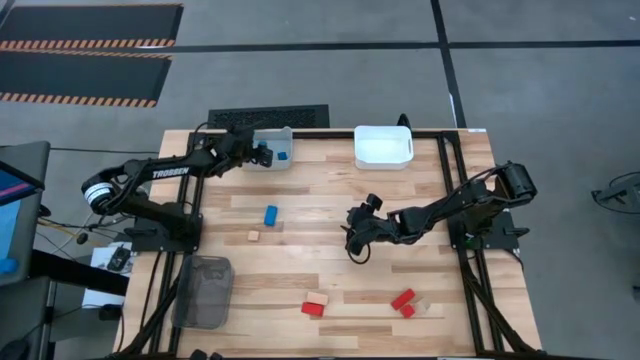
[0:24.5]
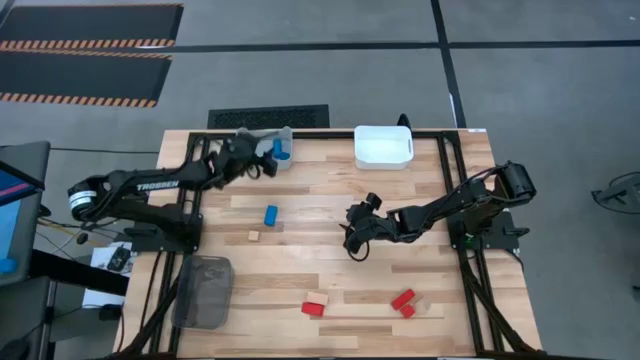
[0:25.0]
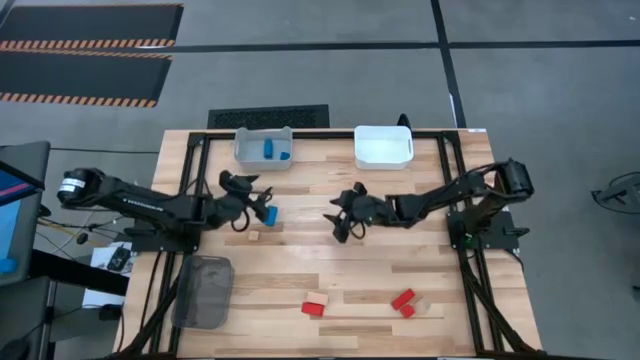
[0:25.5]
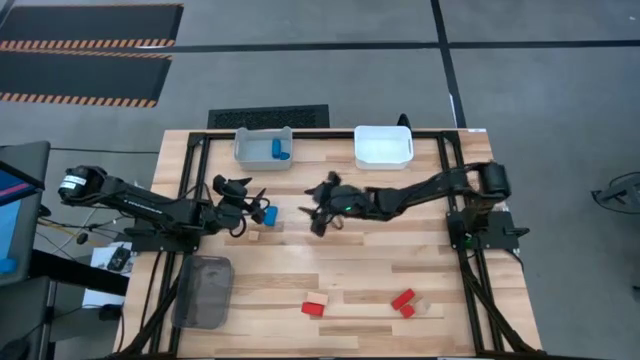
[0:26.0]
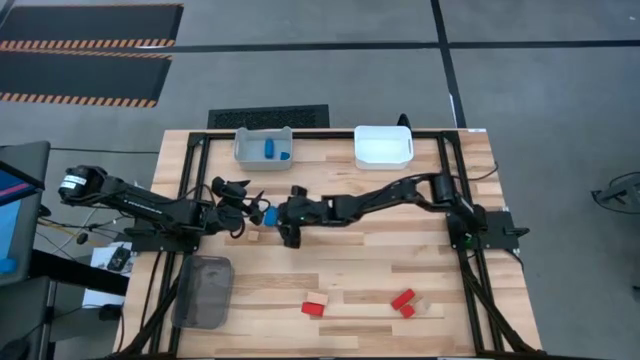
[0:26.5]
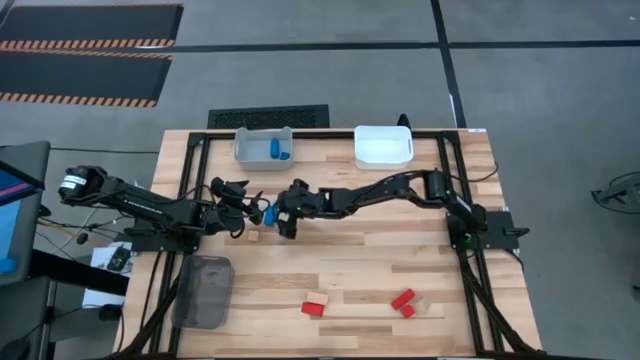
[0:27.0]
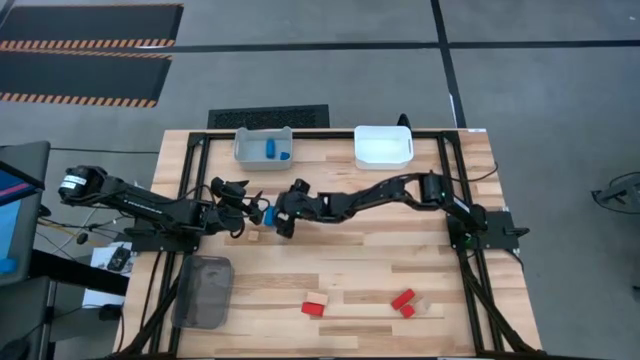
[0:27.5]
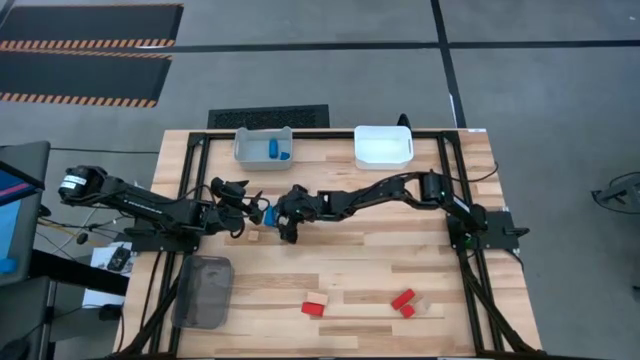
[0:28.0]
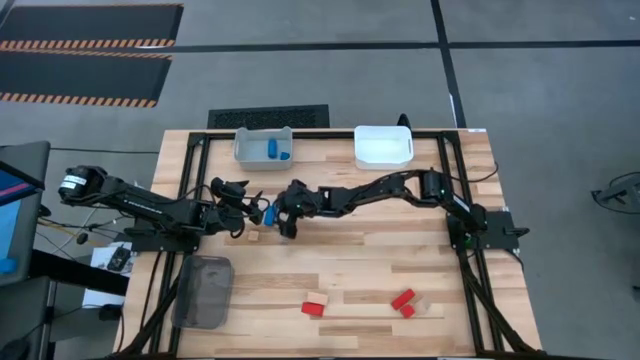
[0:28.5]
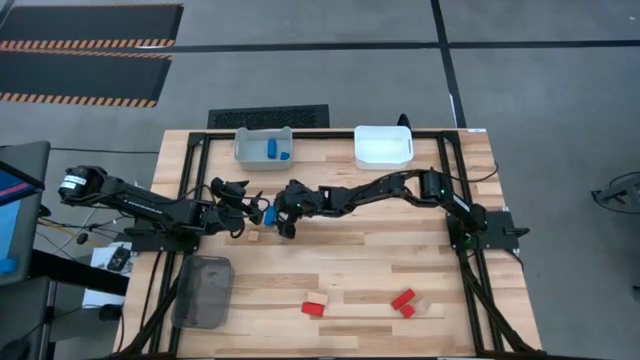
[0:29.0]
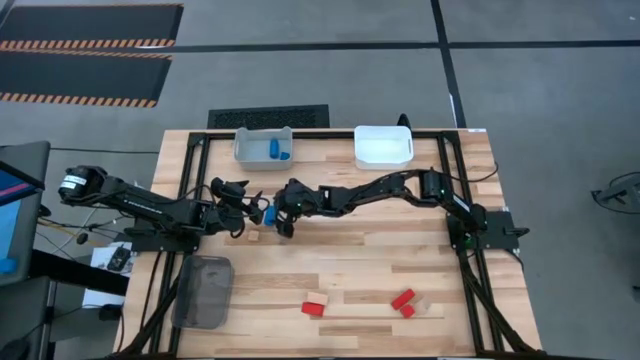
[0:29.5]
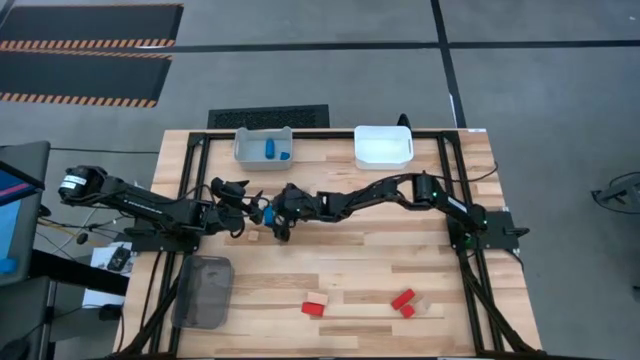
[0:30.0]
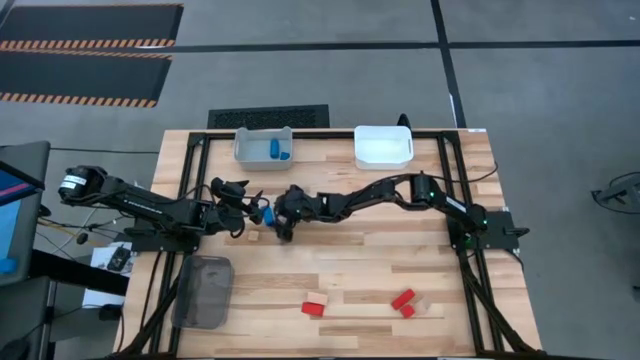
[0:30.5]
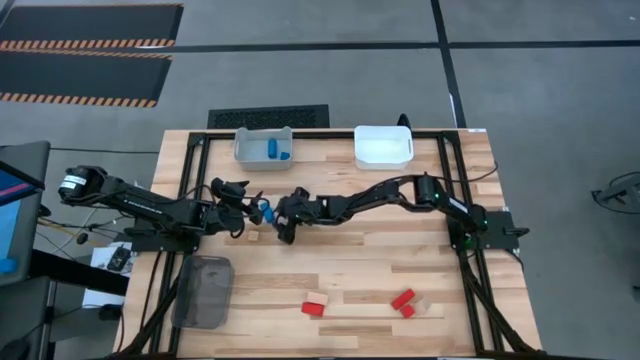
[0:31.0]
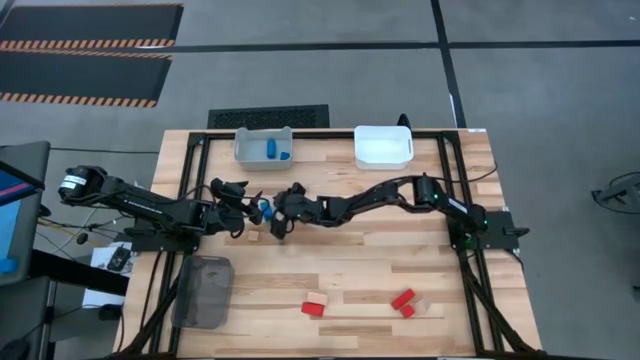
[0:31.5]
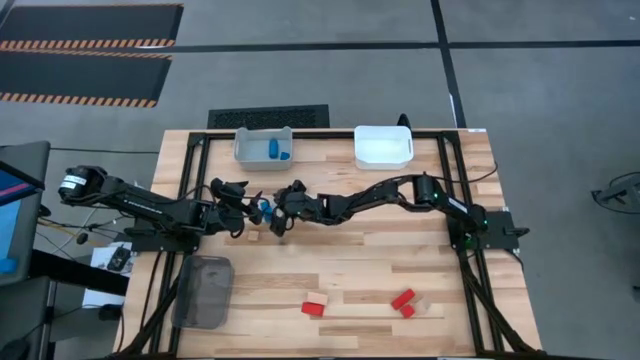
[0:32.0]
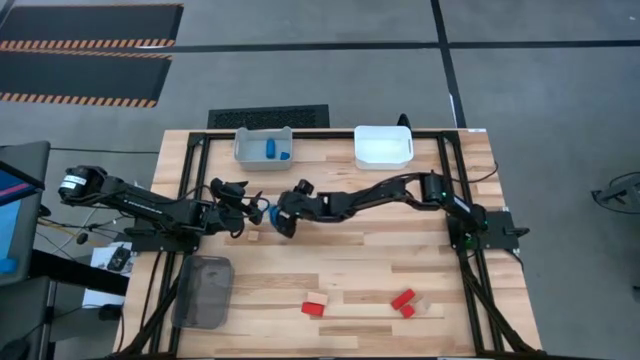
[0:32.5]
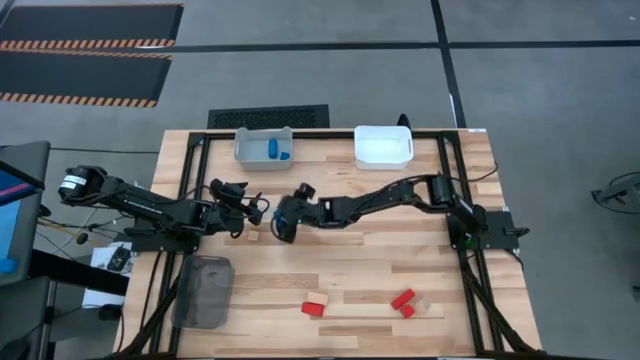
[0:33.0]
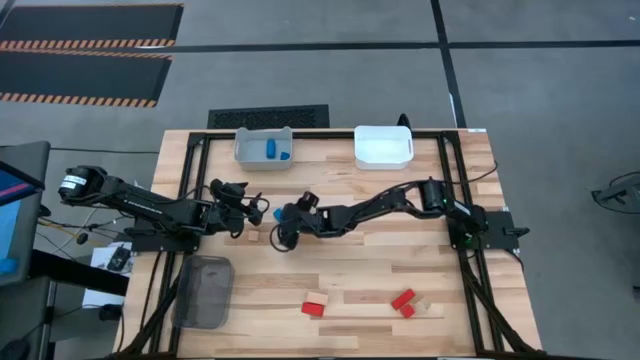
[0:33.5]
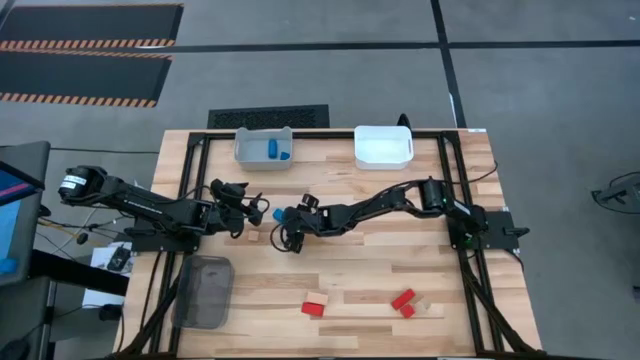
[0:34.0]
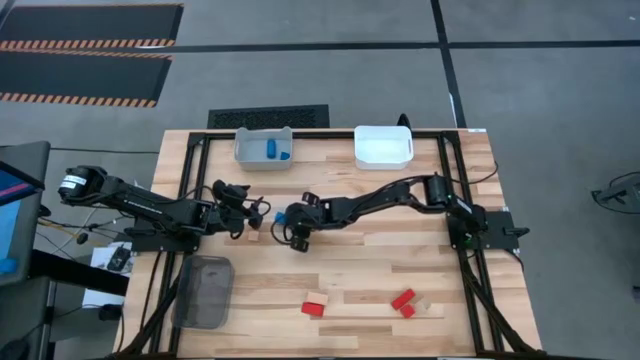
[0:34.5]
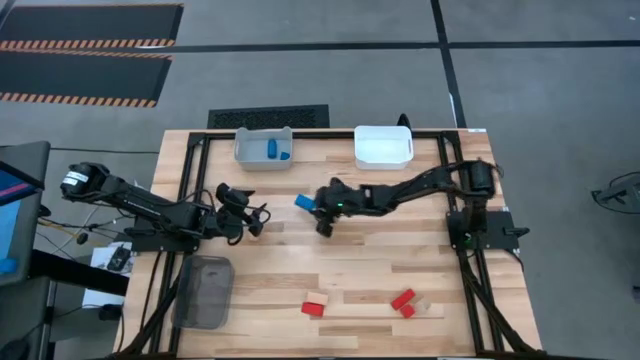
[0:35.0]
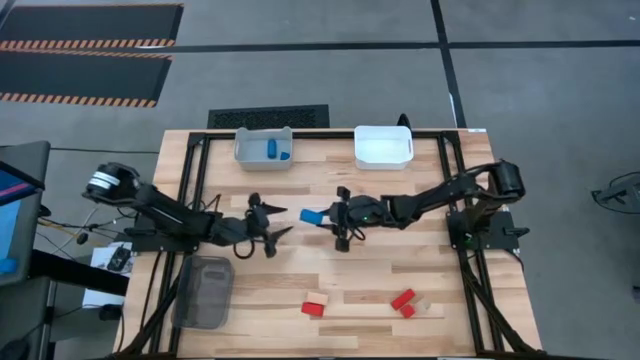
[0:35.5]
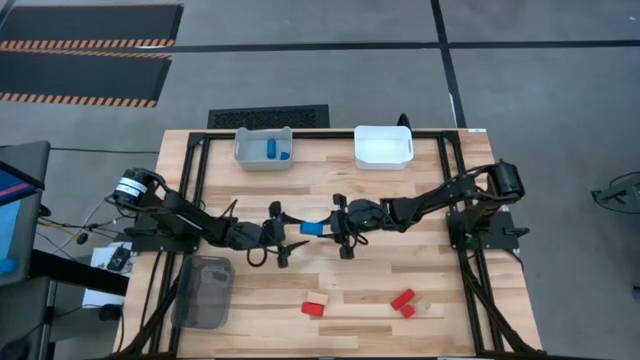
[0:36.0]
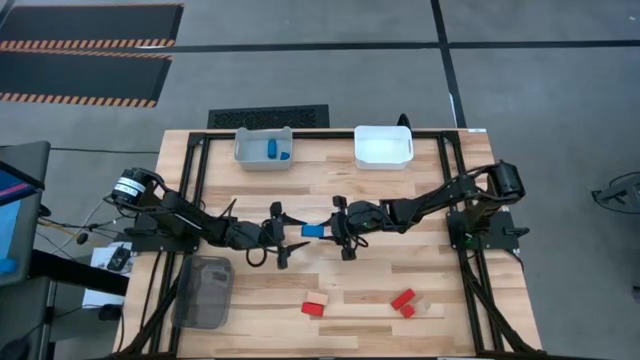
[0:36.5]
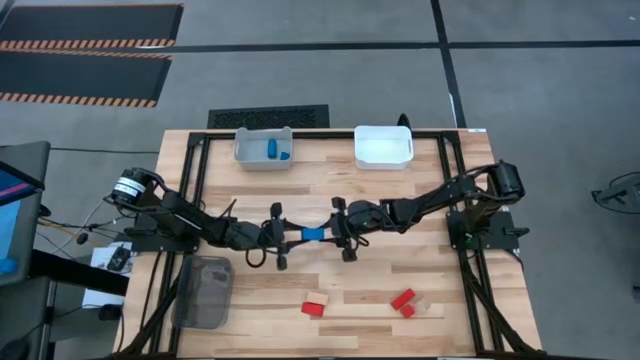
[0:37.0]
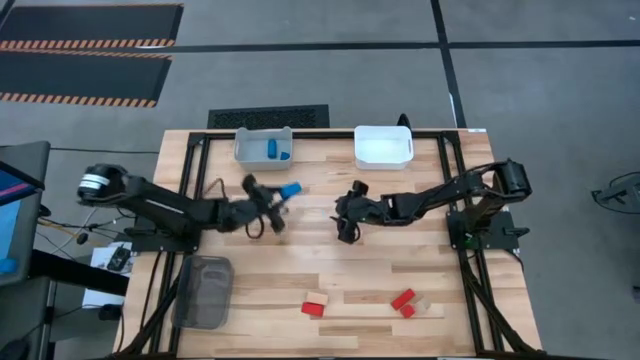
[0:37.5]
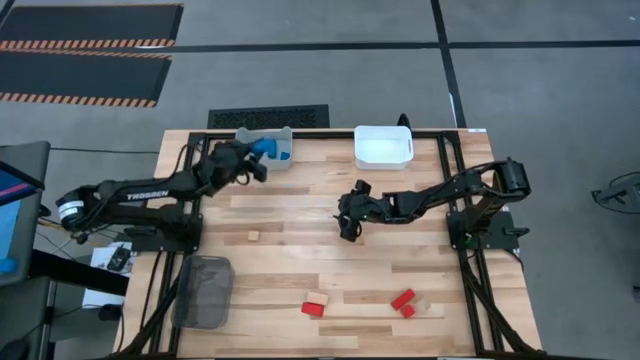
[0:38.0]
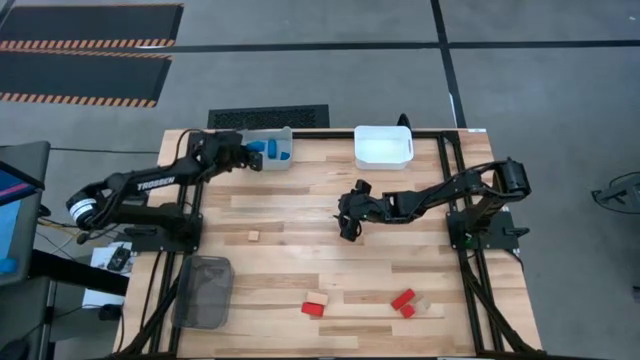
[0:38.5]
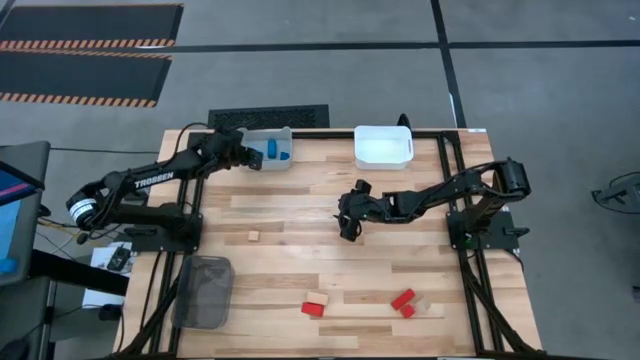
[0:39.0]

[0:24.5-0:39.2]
Task: Sort & place blocks by color
Put the blue rectangle block into the gray bin

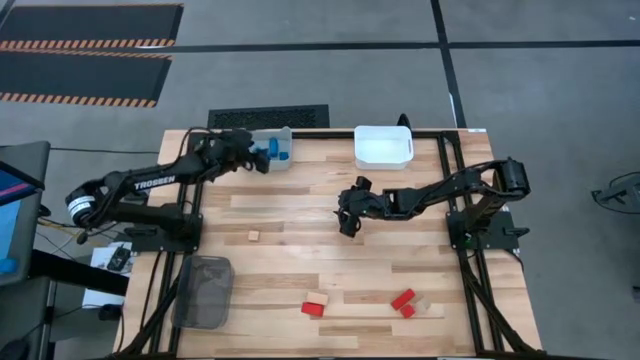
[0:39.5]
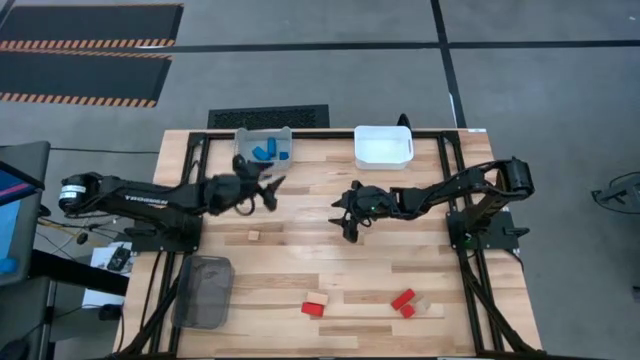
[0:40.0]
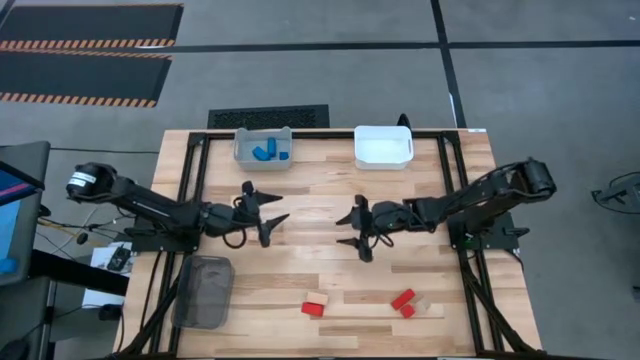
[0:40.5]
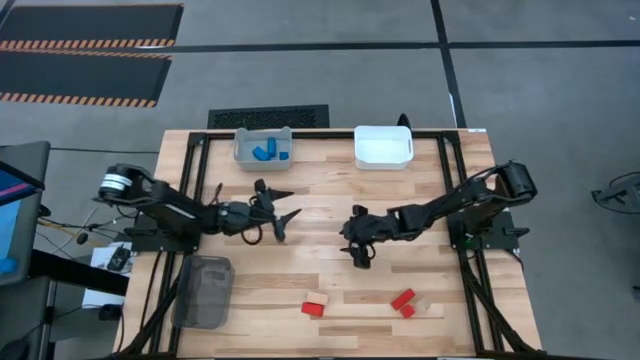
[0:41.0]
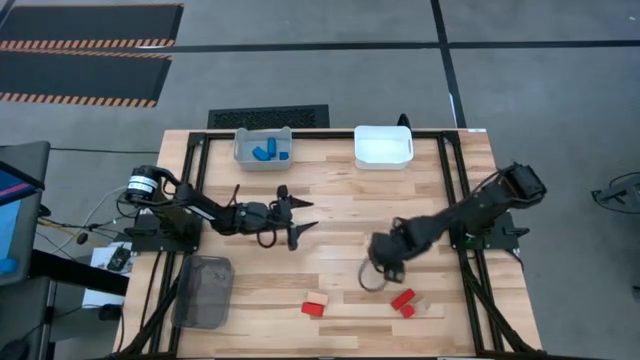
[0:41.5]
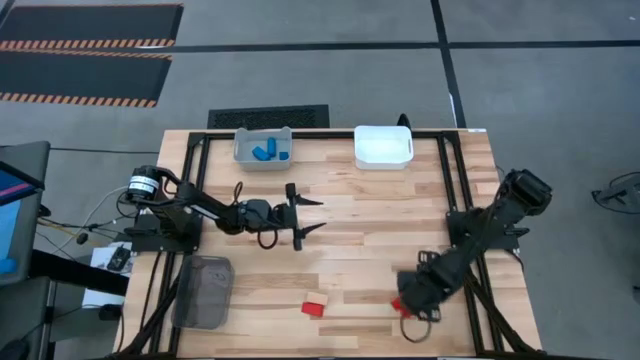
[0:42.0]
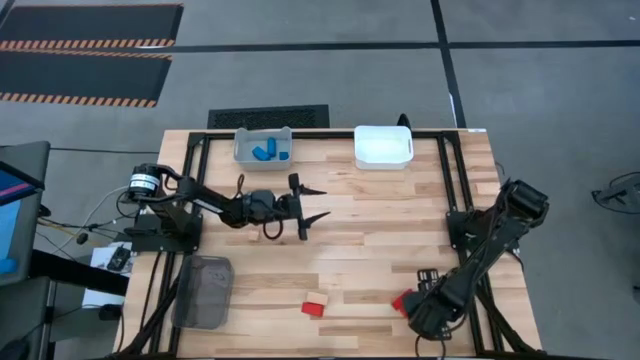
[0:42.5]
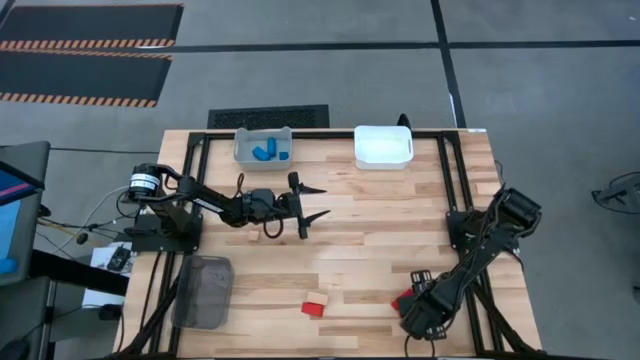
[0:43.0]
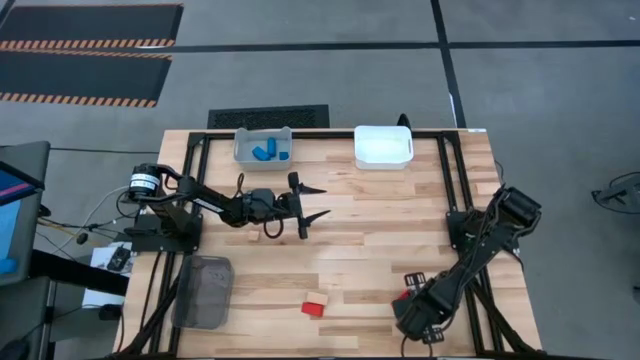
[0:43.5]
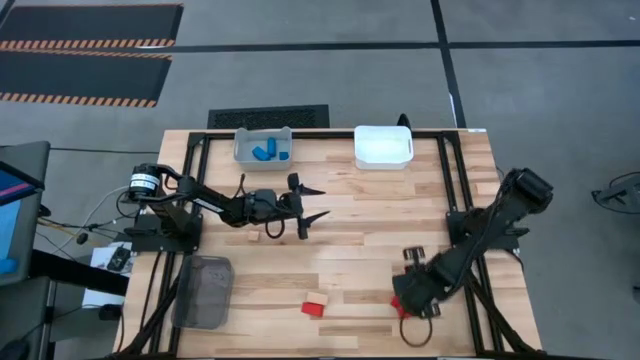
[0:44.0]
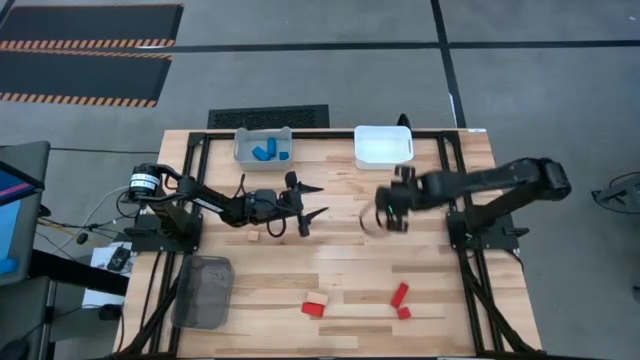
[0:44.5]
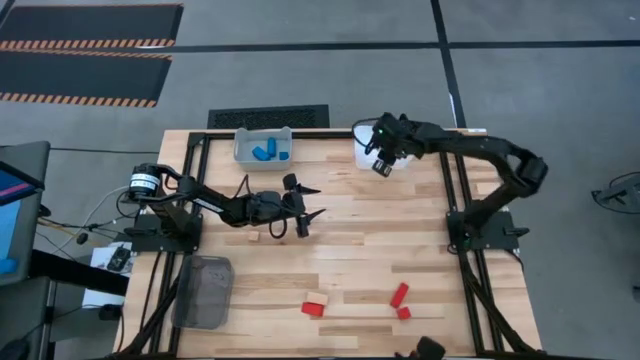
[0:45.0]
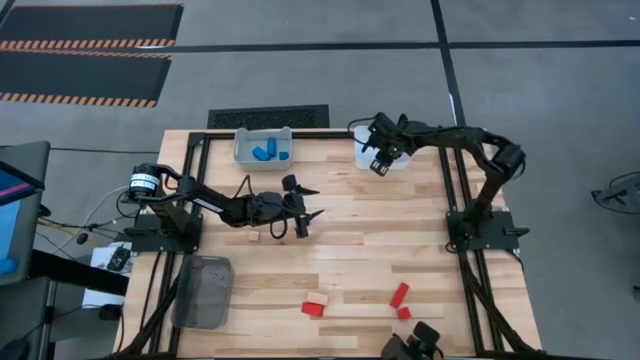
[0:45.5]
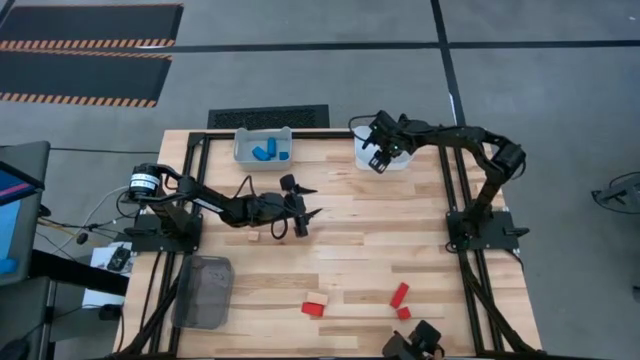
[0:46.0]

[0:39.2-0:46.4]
Put the right brown triangle block into the white bin
